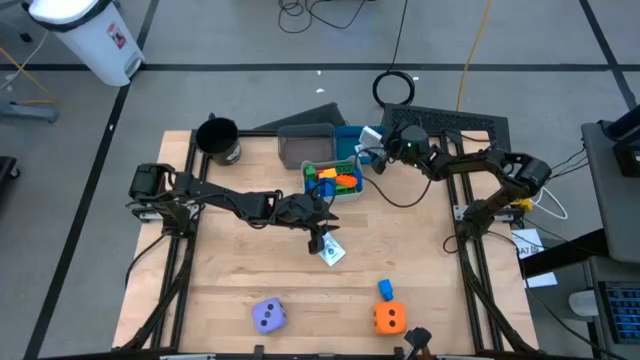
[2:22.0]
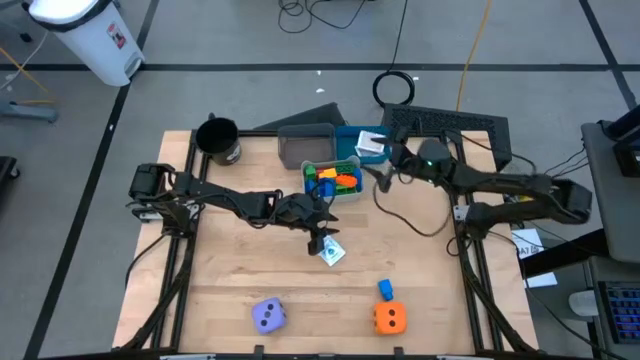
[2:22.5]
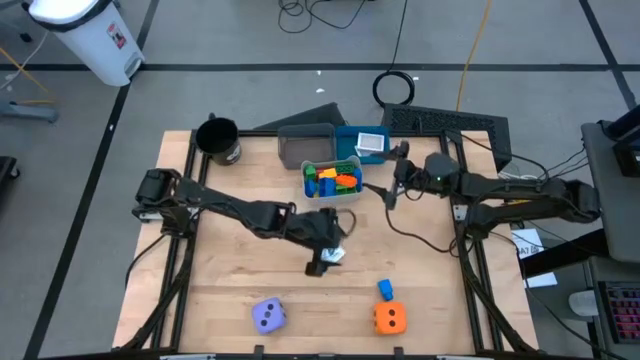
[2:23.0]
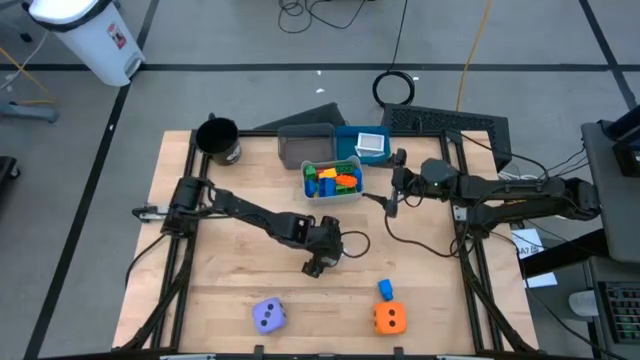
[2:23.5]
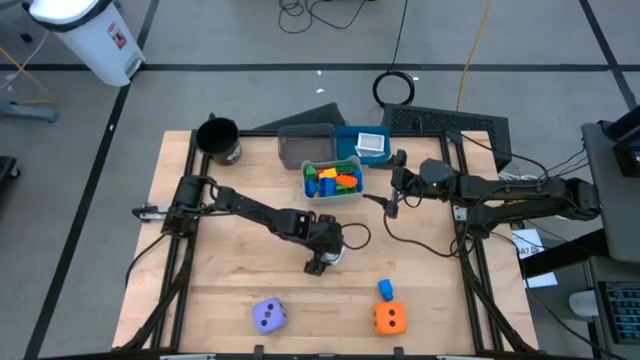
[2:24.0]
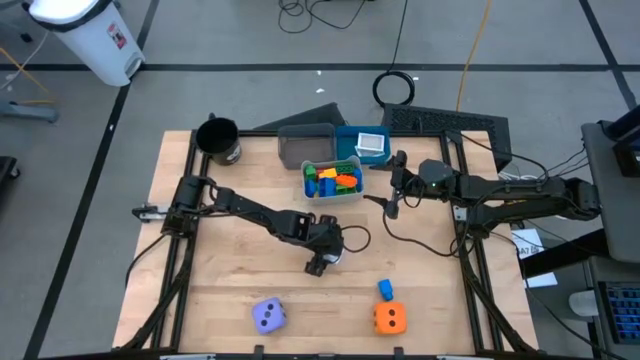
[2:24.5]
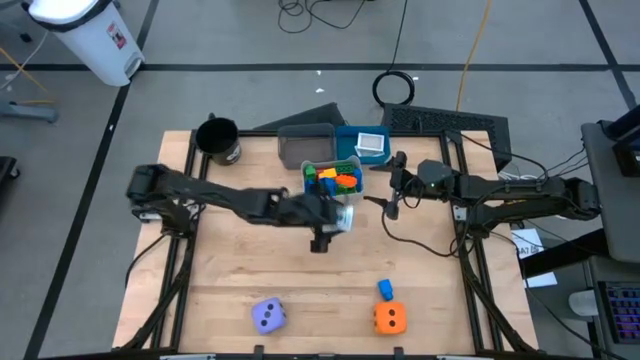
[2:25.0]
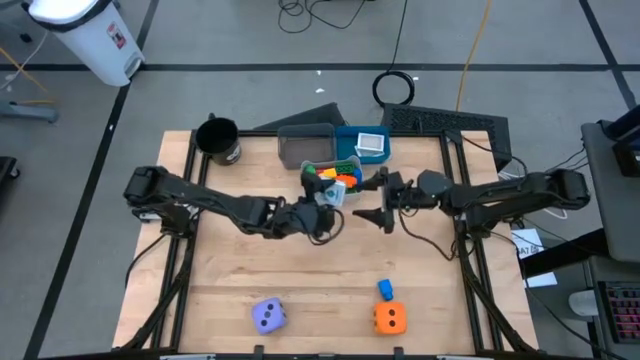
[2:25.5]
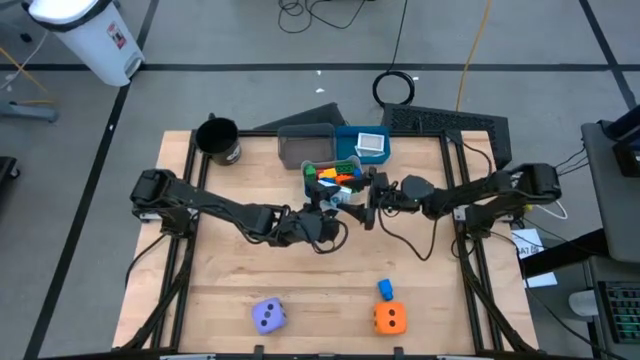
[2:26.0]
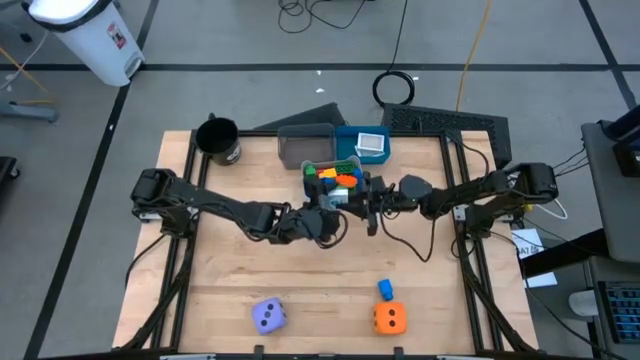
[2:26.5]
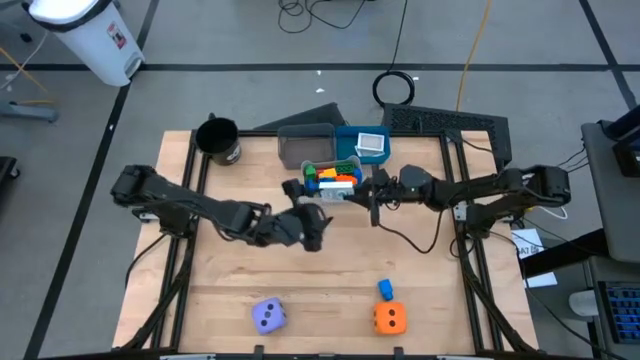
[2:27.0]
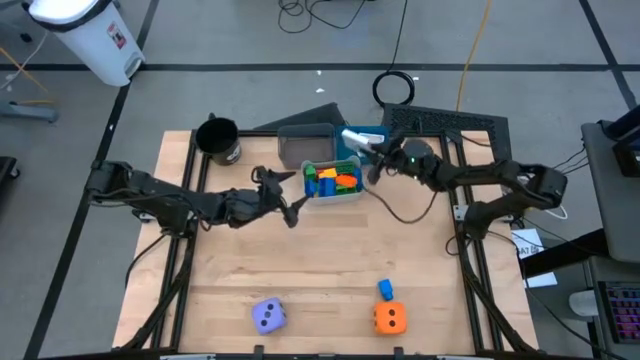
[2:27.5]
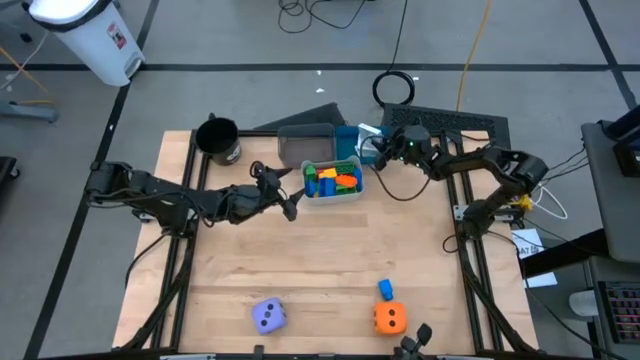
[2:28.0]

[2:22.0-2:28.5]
Task: Pick & Place Toys
Put the blue deck of cards into the blue bin

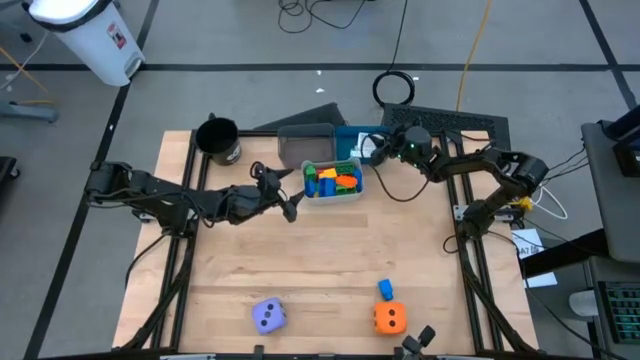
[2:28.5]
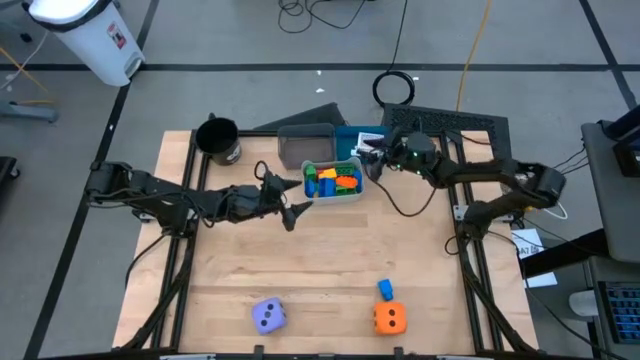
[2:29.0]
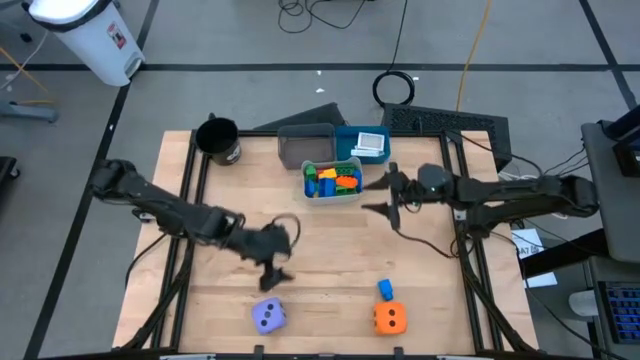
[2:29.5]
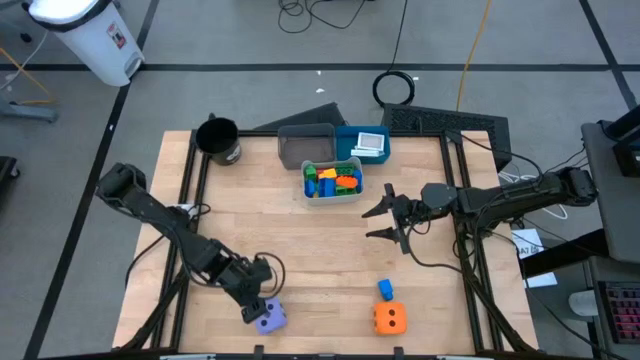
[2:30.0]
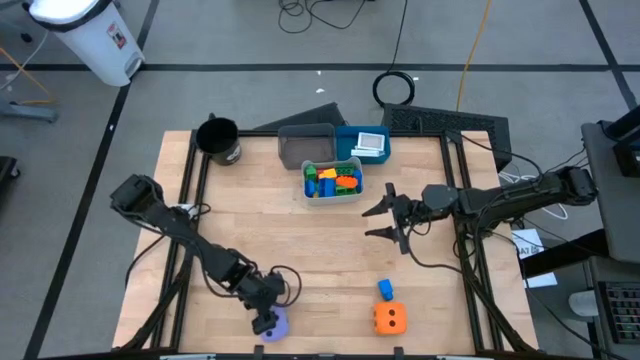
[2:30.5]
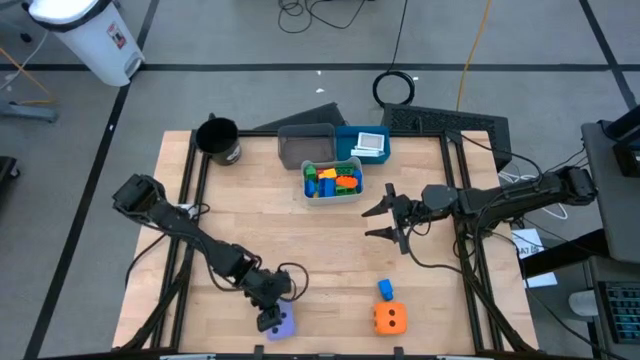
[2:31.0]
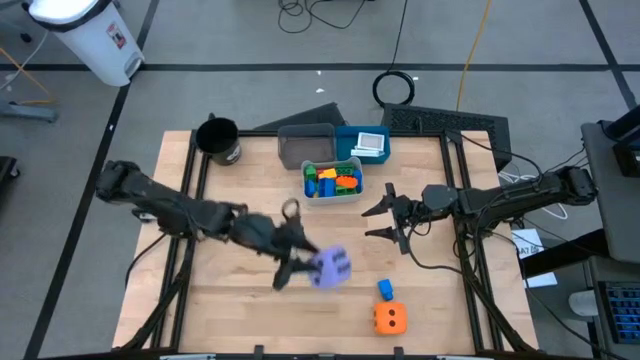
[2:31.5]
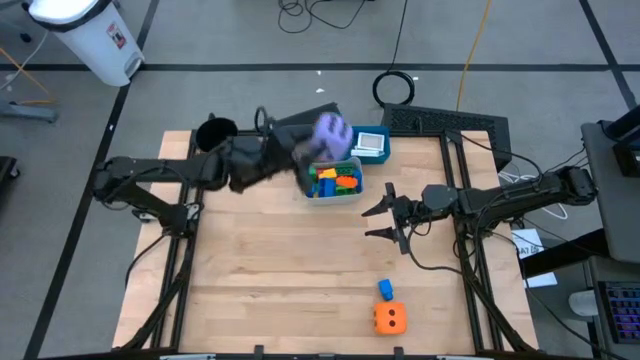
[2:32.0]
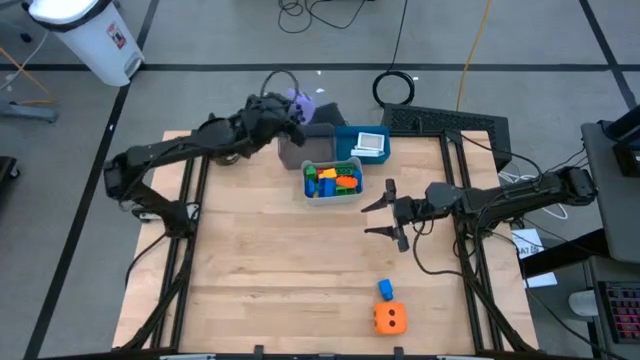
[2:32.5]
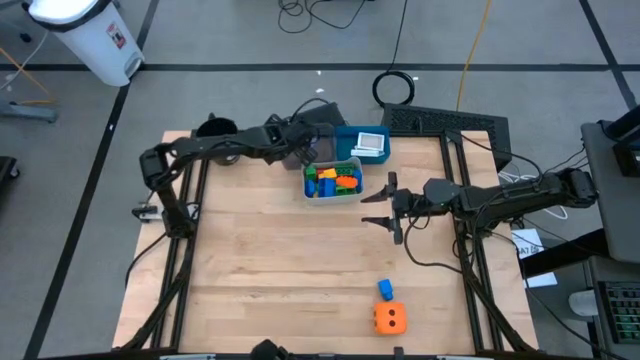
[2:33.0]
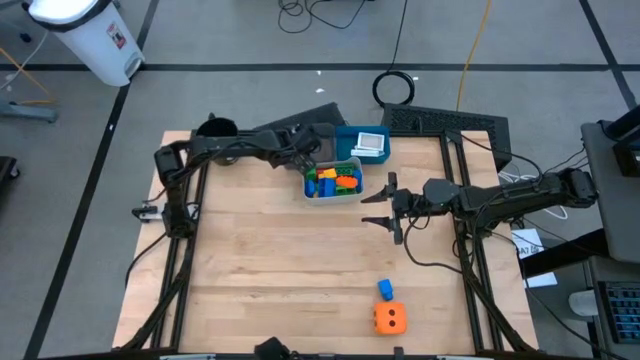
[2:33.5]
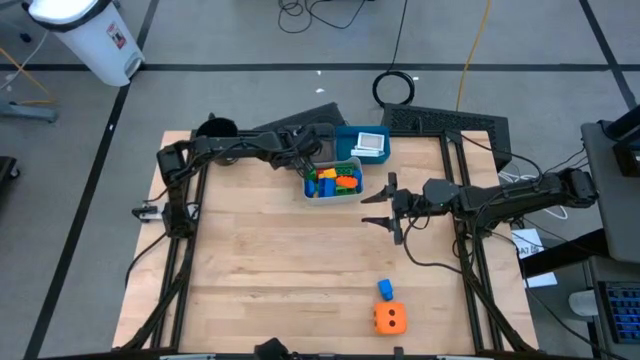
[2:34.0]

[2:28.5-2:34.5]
Put the purple dice into the black bin
